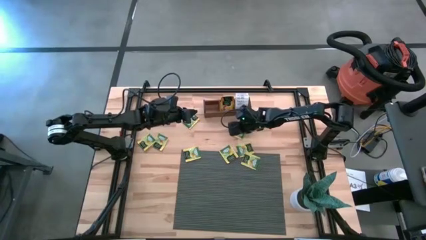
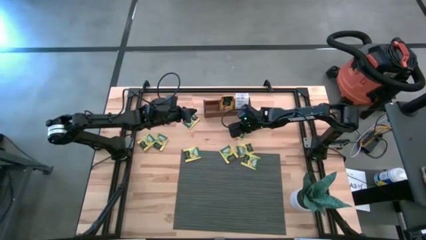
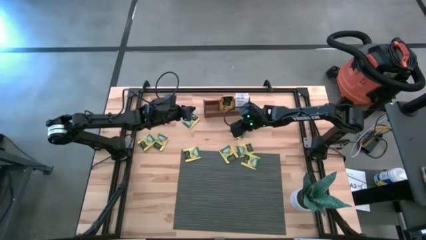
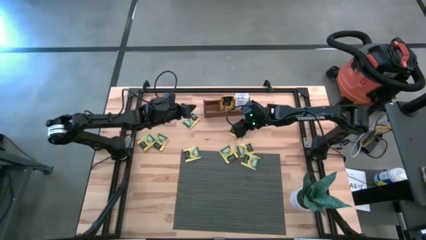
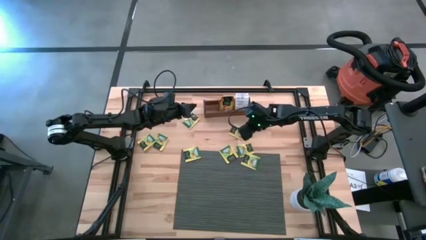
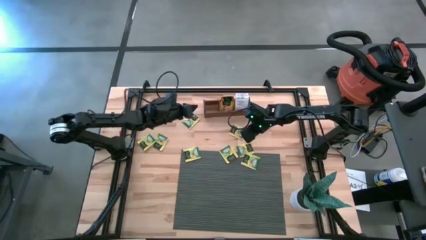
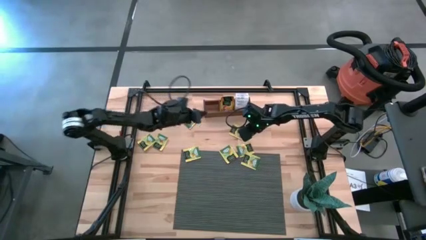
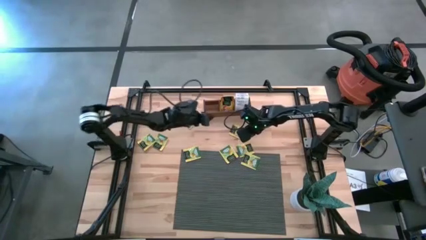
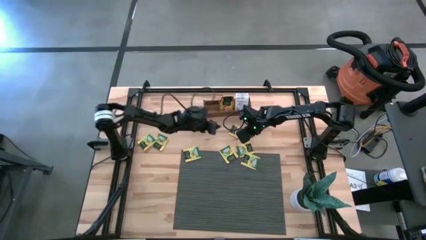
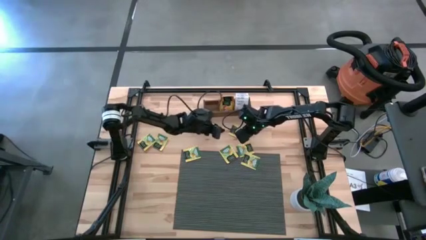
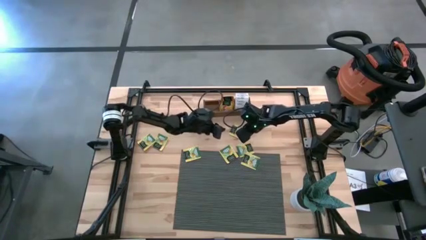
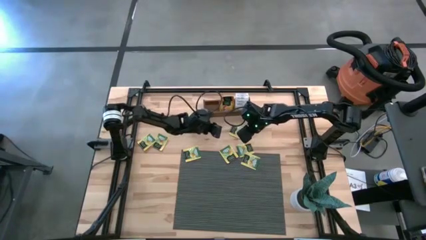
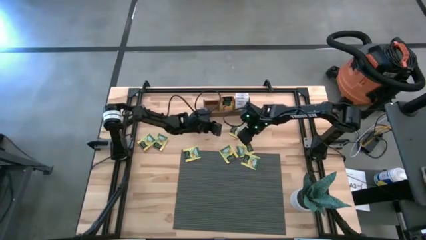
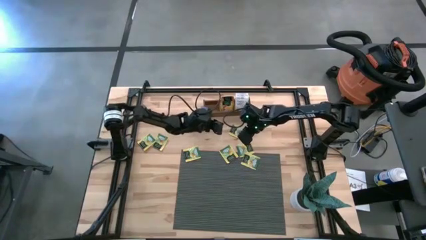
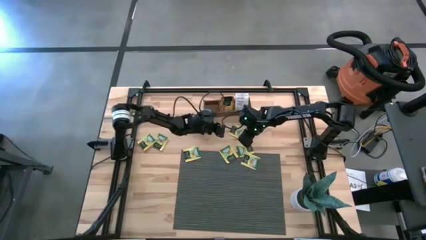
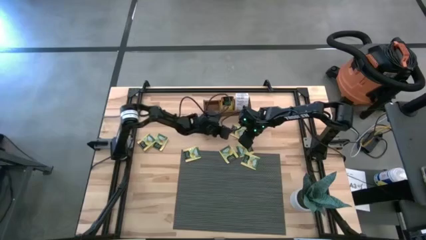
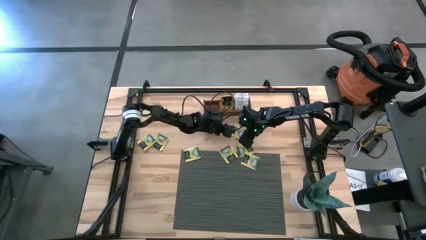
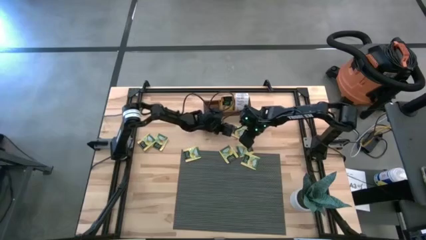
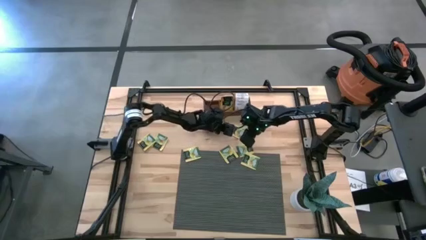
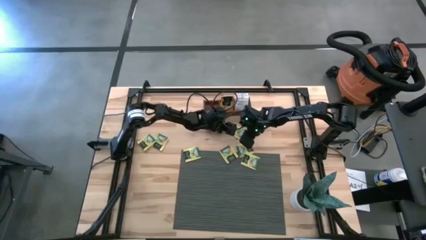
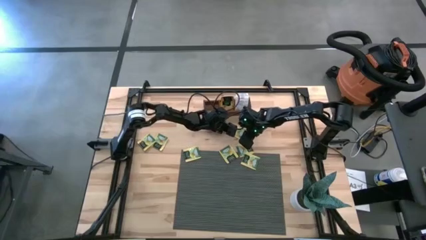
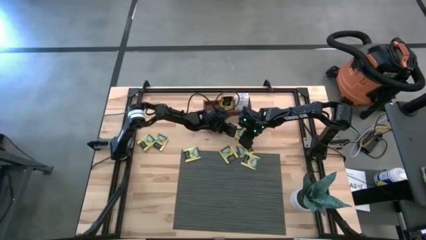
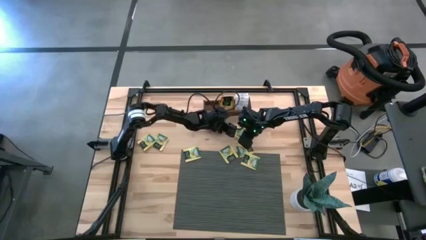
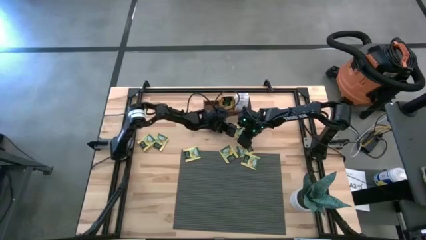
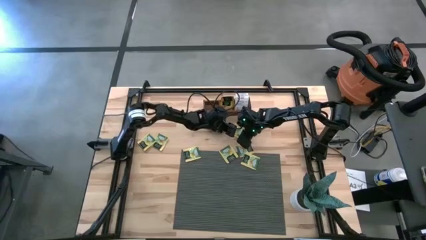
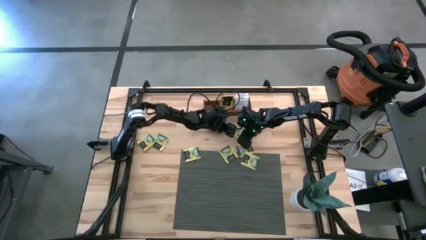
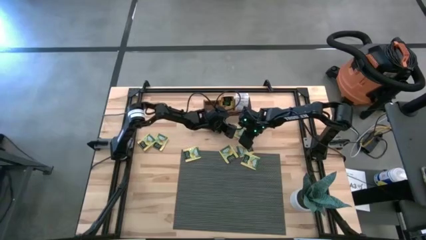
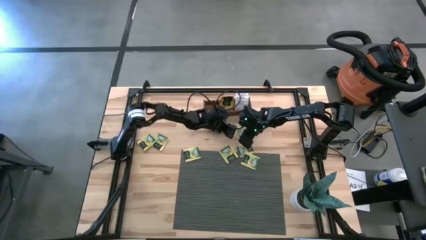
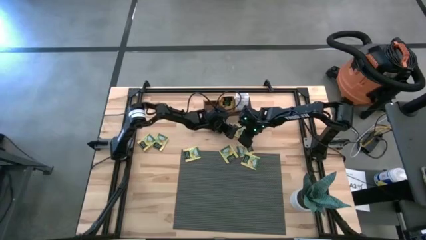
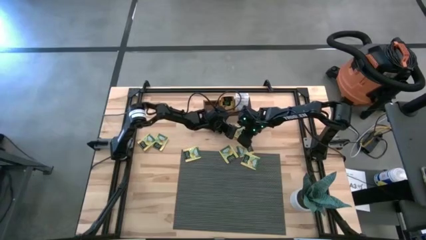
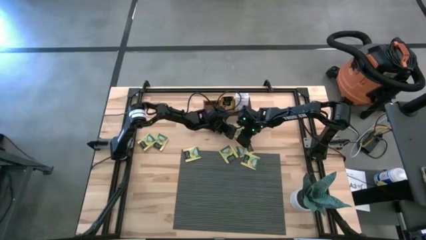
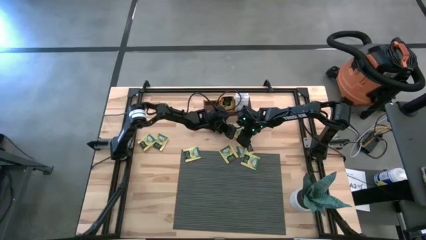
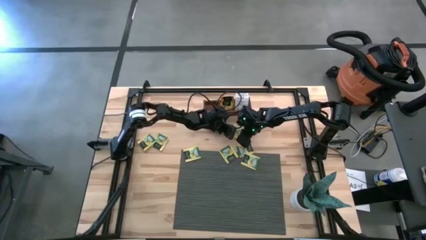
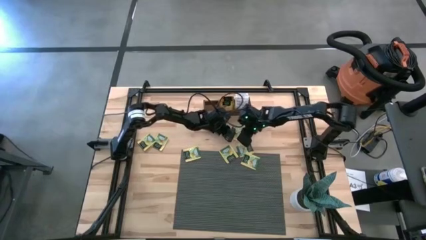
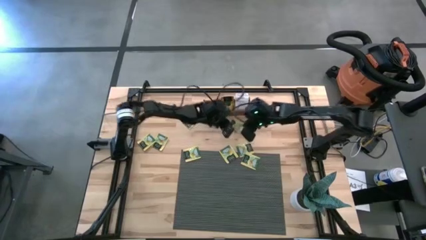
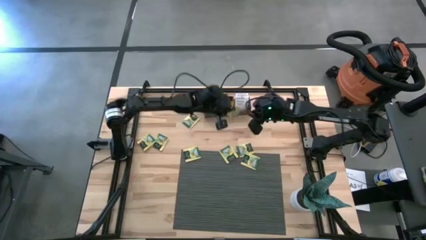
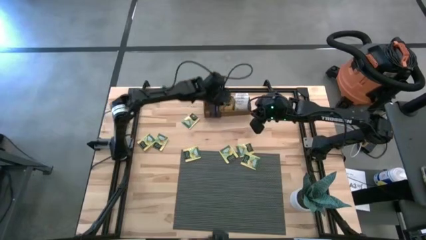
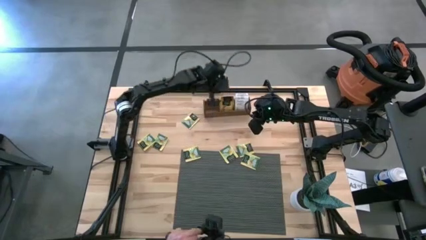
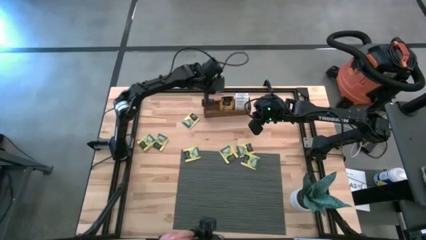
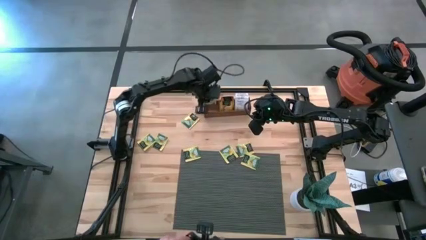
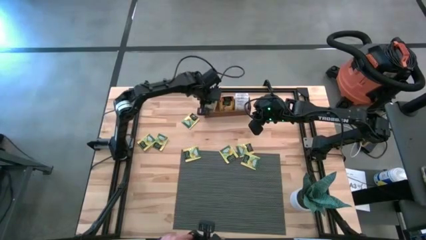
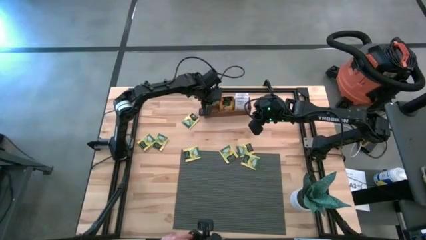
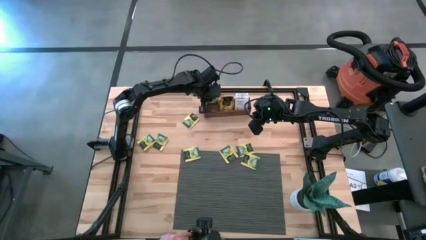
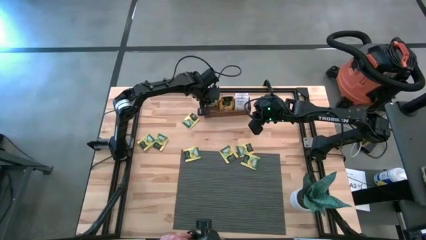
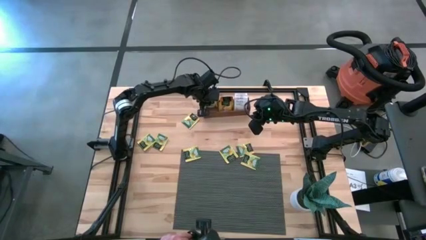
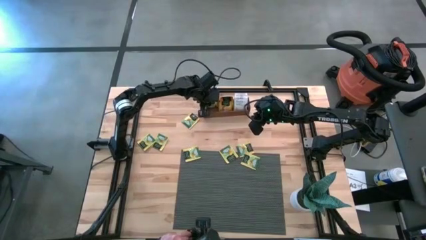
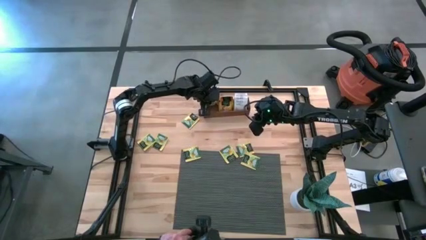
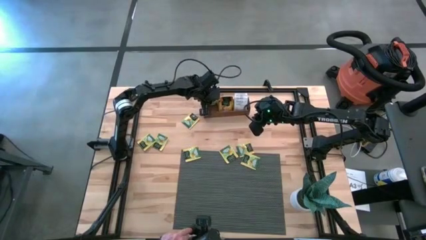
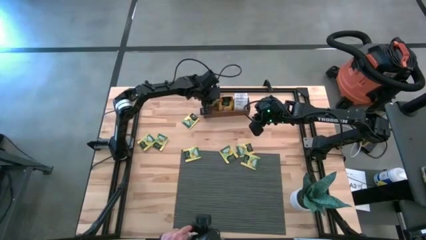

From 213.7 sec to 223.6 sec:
Task: Pick & Place Tea
Put the yellow tea bag into the left section of the wooden organizer

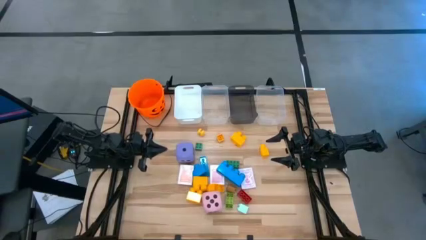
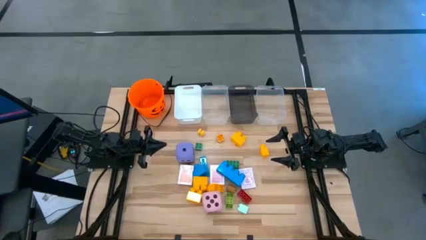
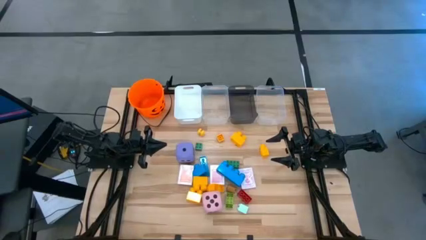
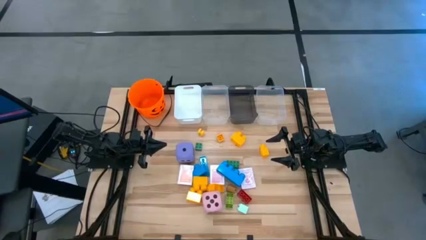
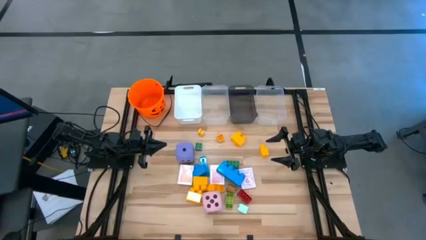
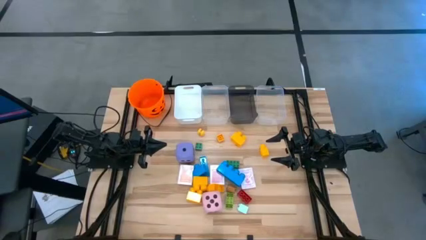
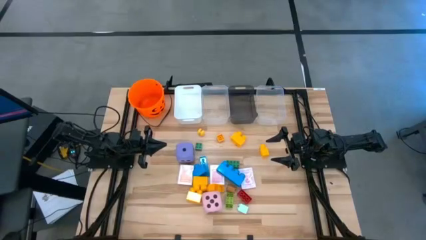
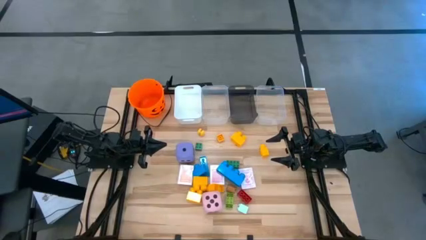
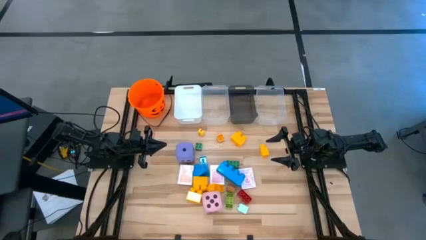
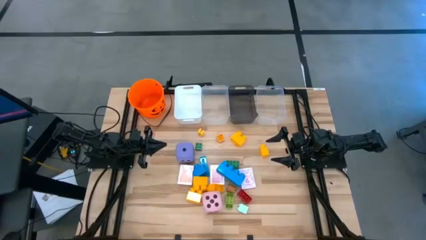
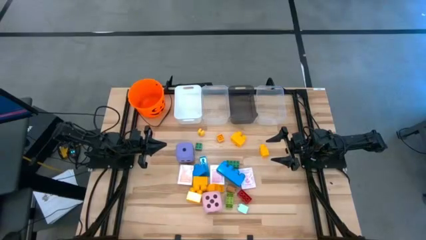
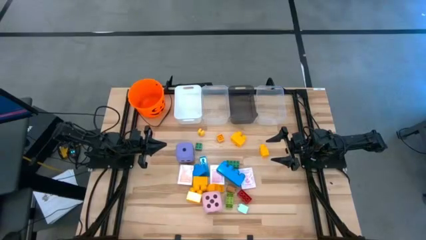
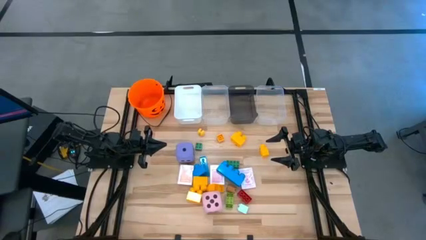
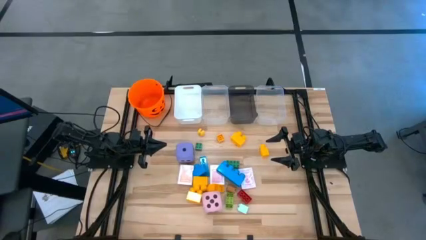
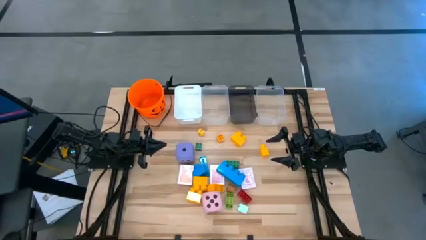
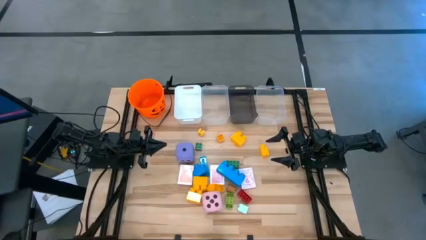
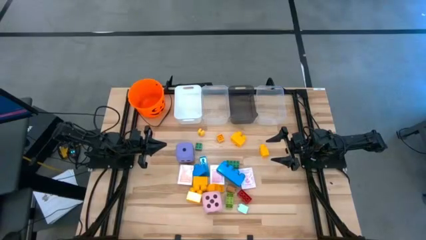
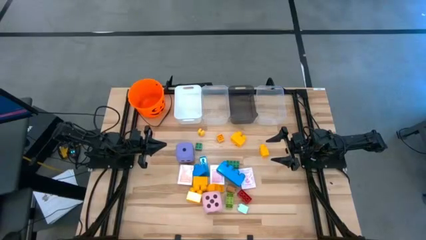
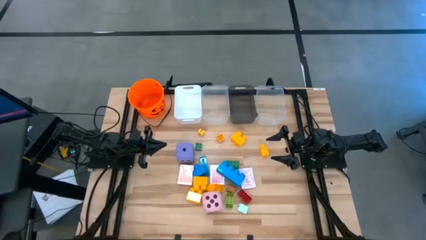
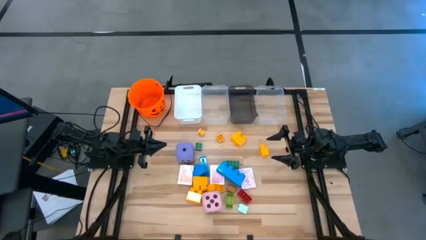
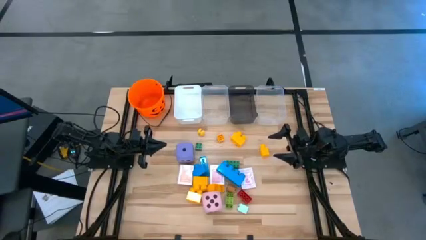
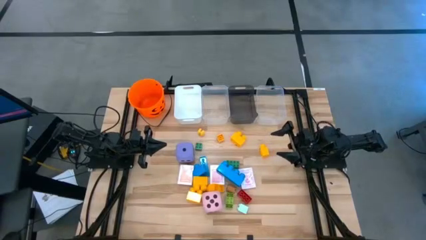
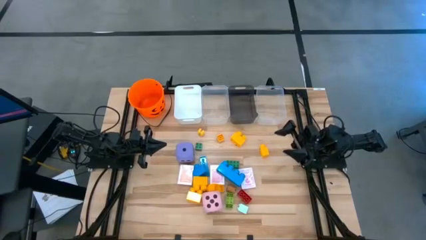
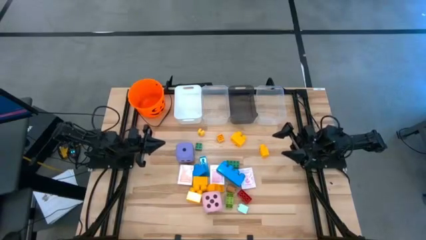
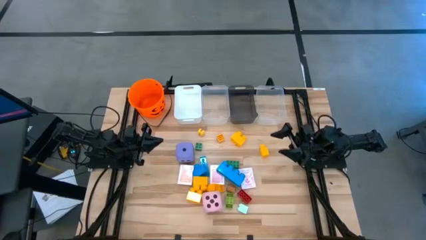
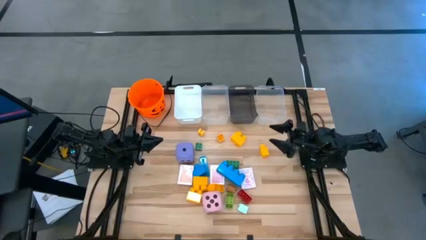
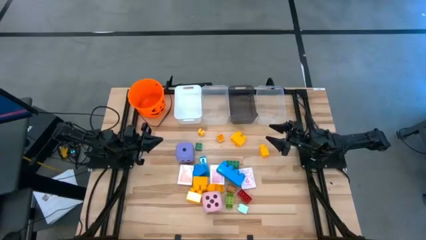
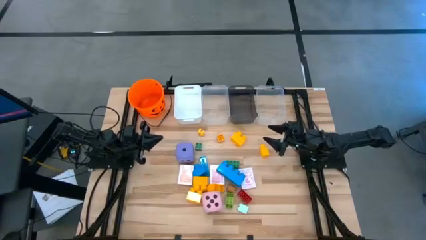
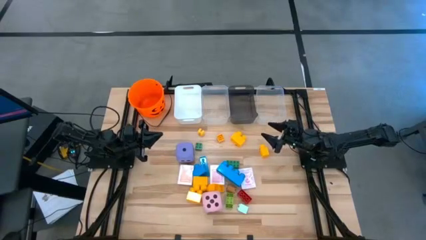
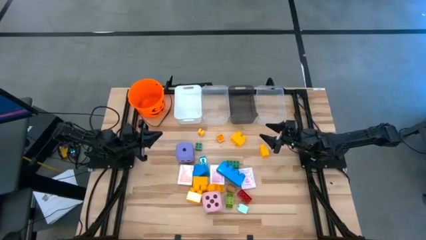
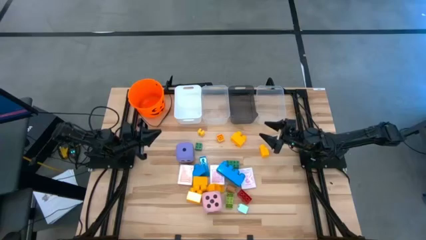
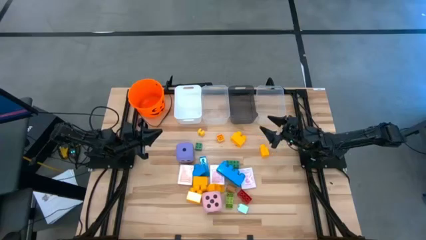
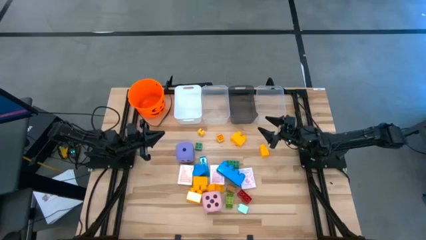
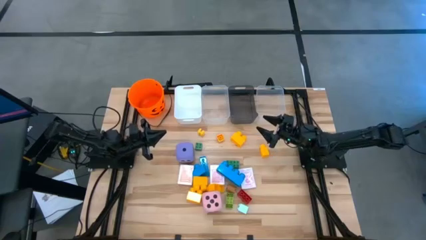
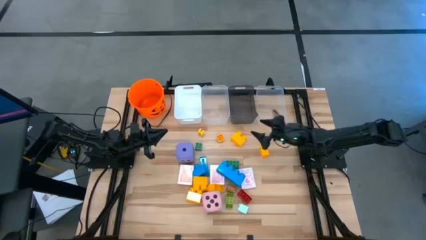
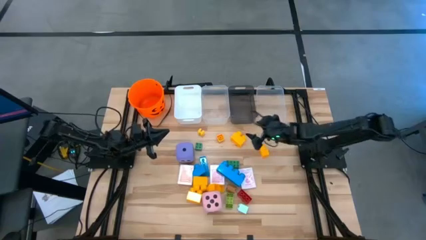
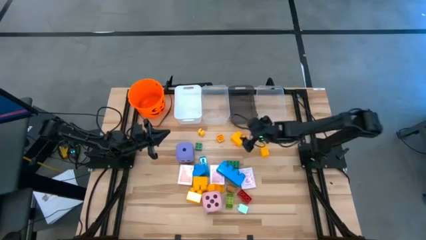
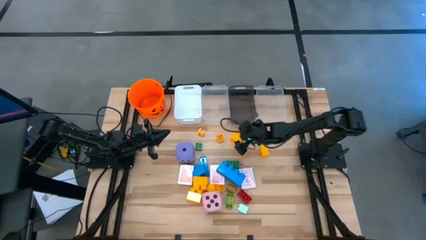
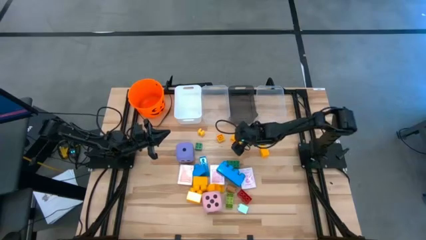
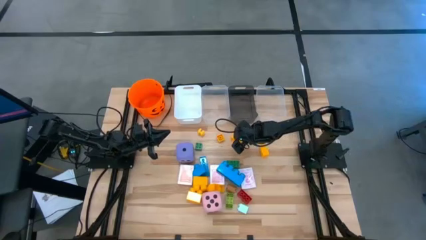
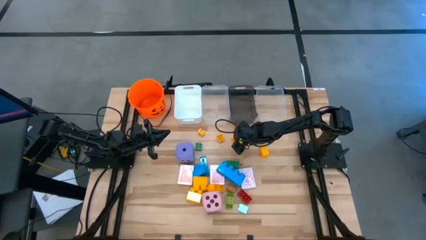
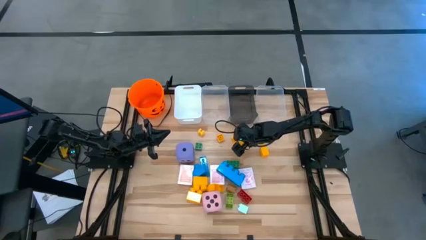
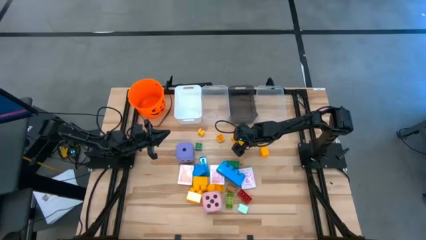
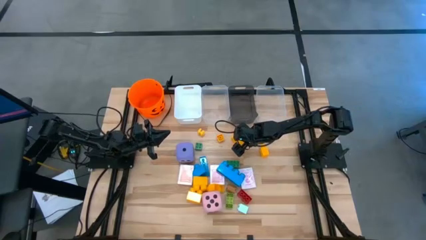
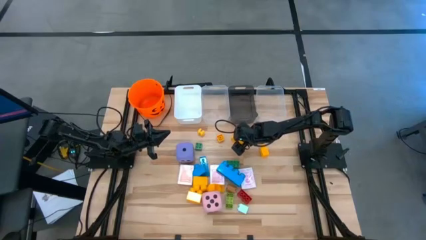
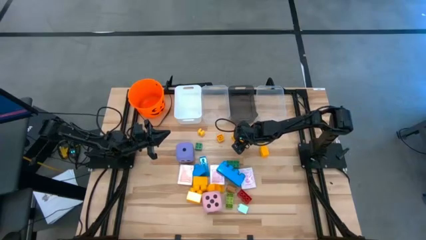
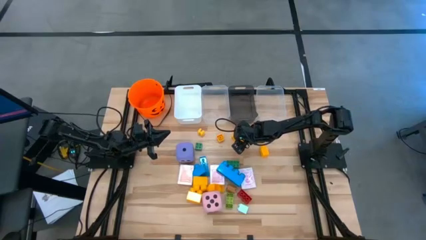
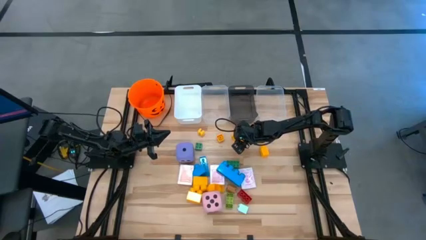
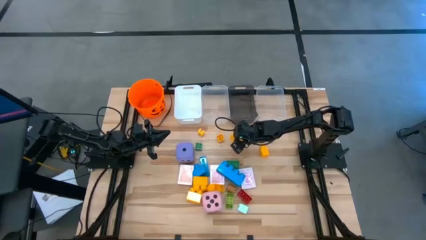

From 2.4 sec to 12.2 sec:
Task: Pick & Place Toys
Put the large yellow game piece into the black bin
